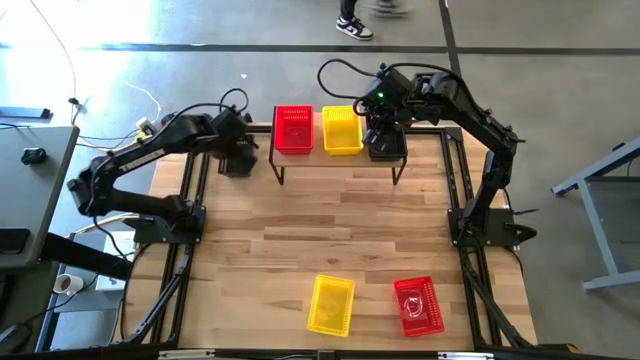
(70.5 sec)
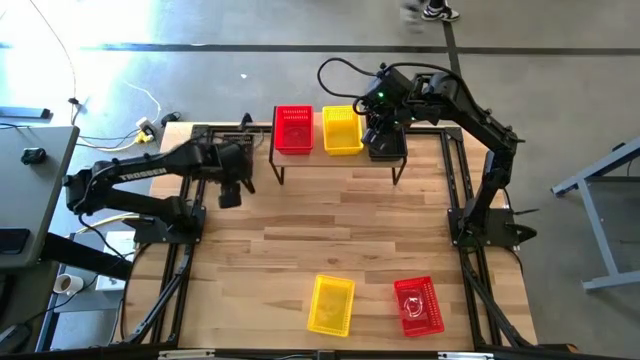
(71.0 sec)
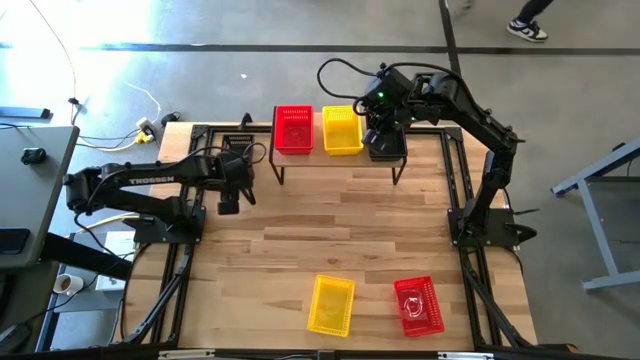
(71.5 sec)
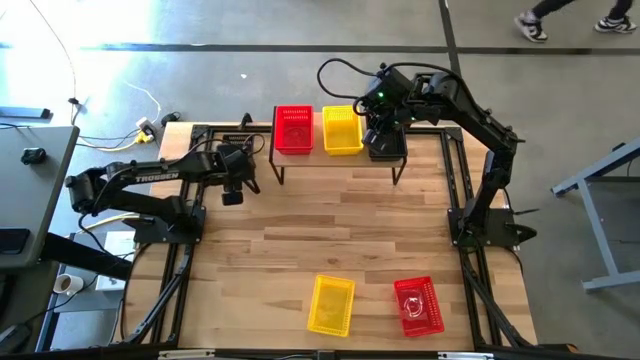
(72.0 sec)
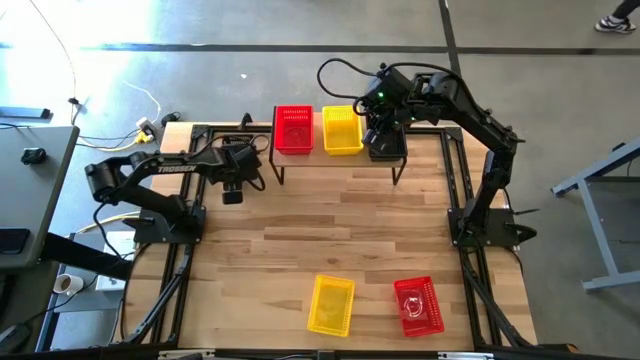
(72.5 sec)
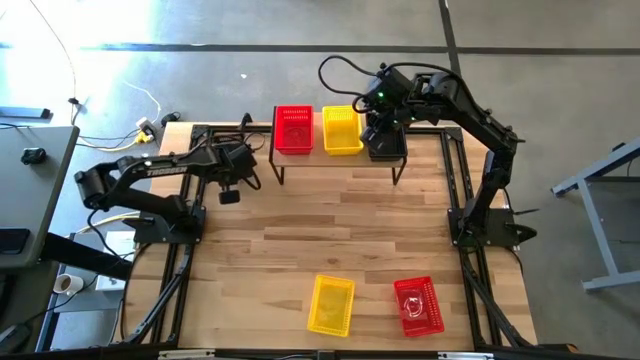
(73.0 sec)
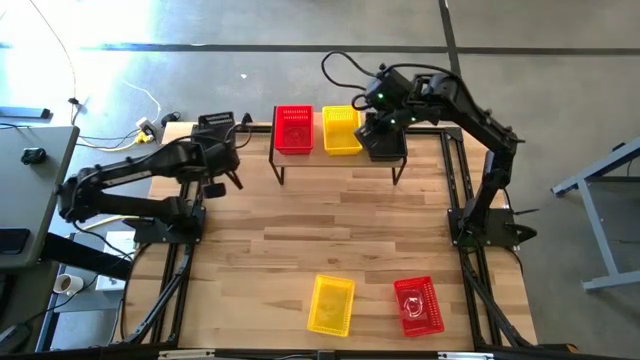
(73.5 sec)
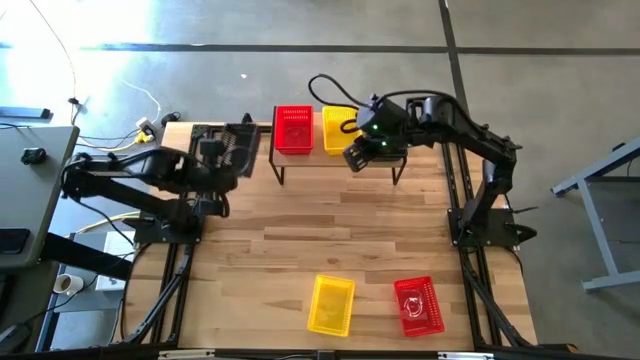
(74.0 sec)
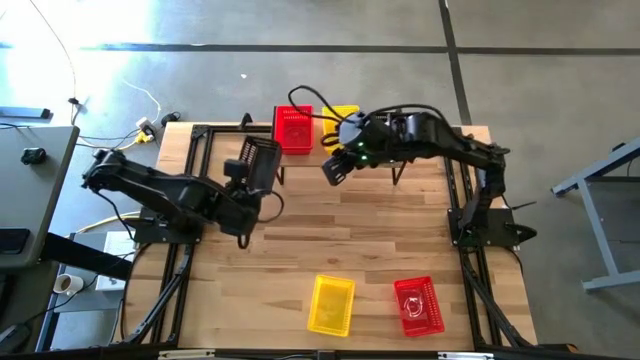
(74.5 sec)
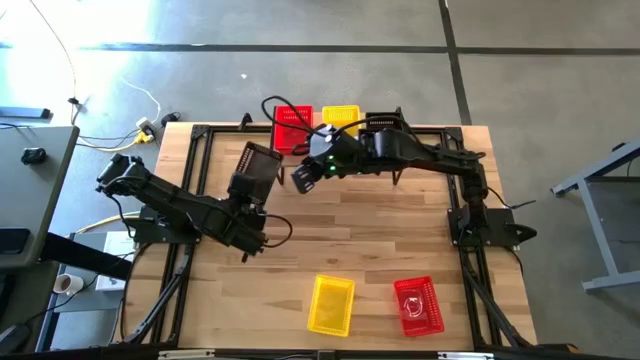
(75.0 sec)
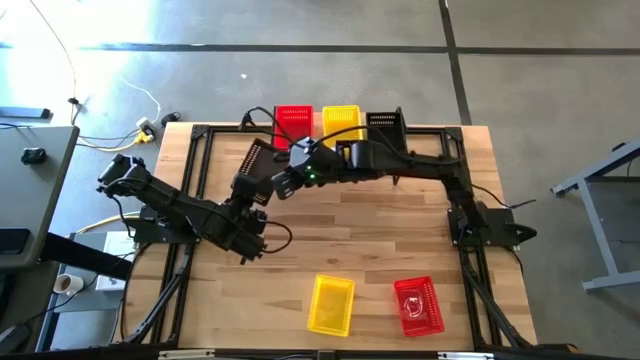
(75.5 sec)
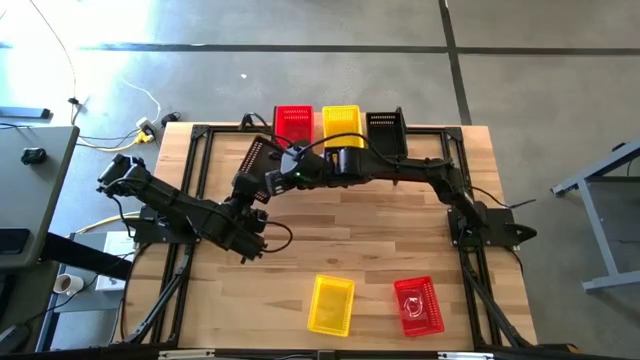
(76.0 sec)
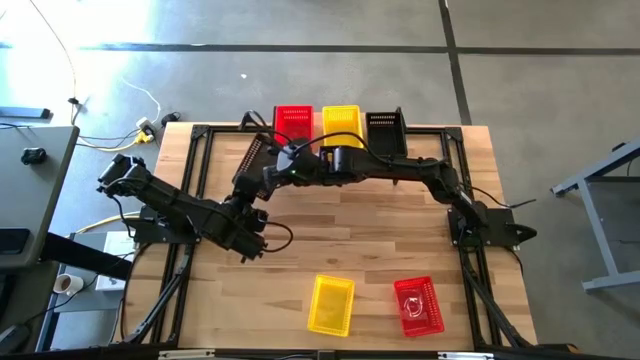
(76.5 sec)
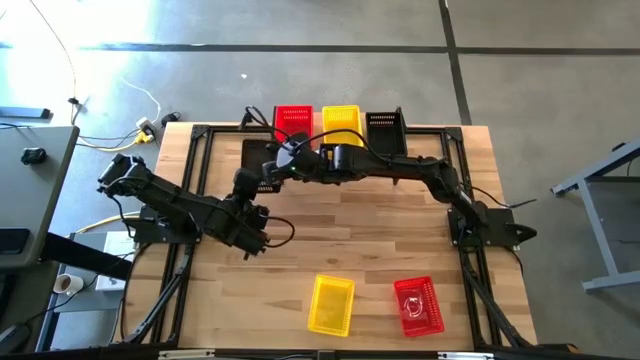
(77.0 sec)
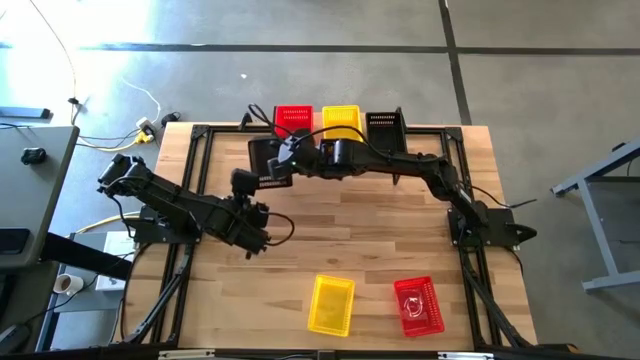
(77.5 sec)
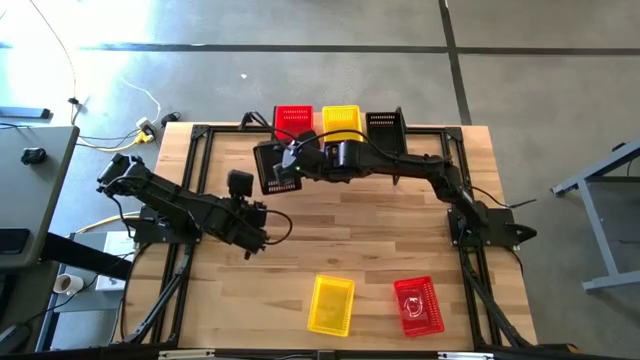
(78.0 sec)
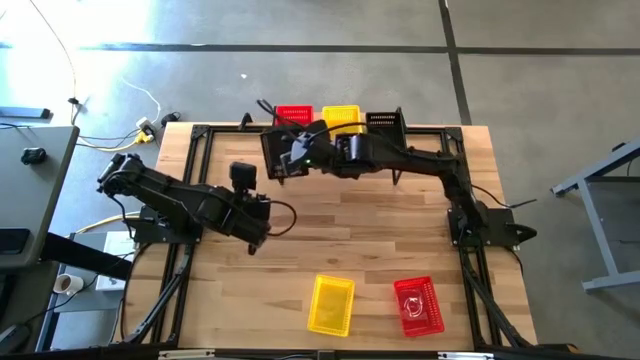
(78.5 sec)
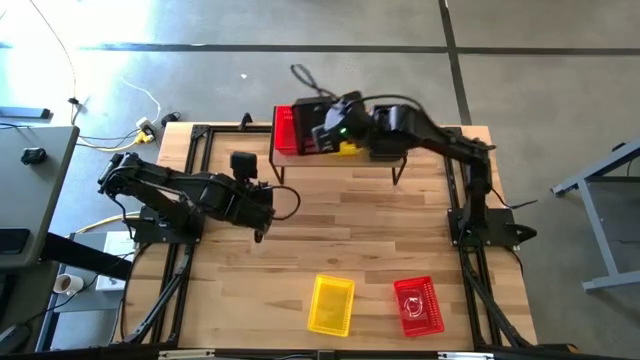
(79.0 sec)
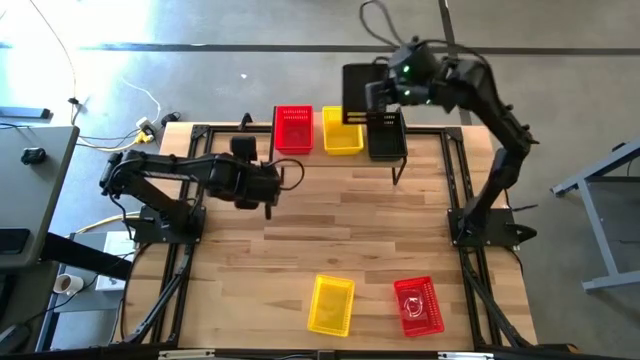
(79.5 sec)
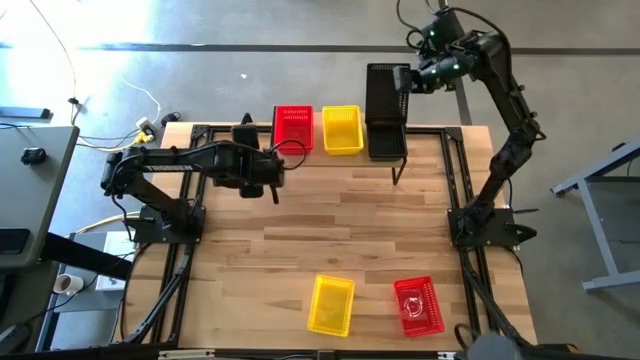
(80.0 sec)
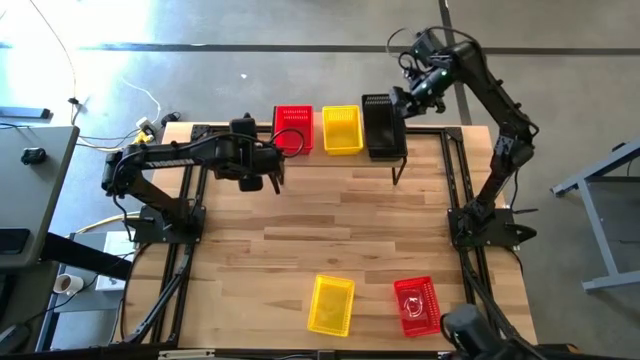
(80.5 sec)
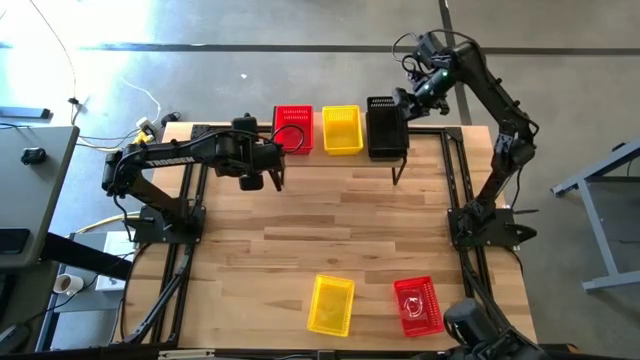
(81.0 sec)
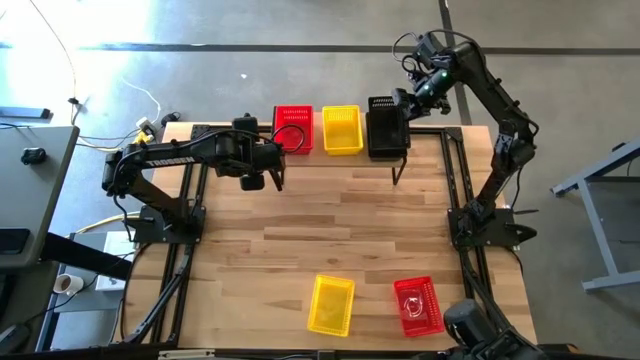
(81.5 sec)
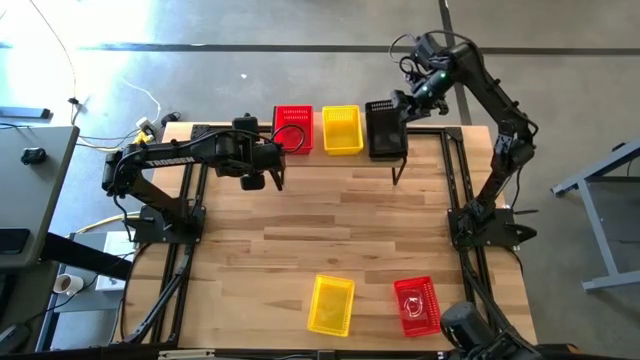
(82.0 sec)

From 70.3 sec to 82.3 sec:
Task: Stack baskets on shelf by color
Stack the black bin on top of the other black bins on the shelf

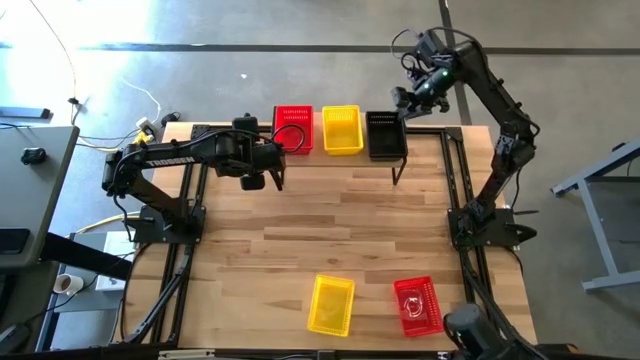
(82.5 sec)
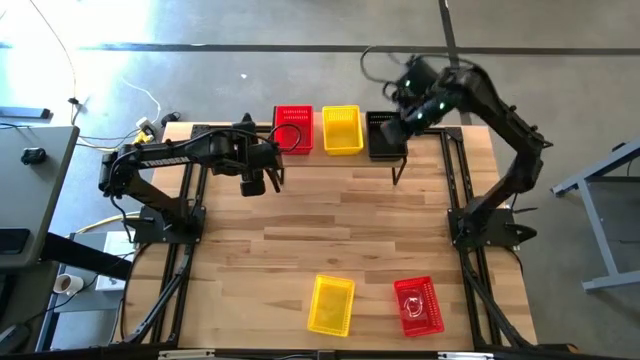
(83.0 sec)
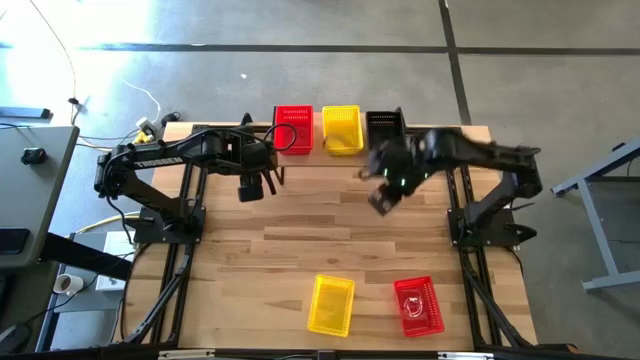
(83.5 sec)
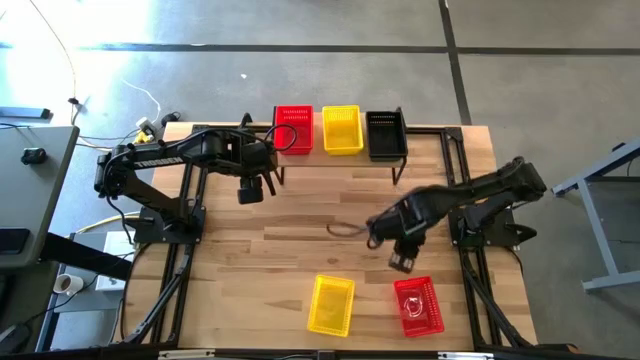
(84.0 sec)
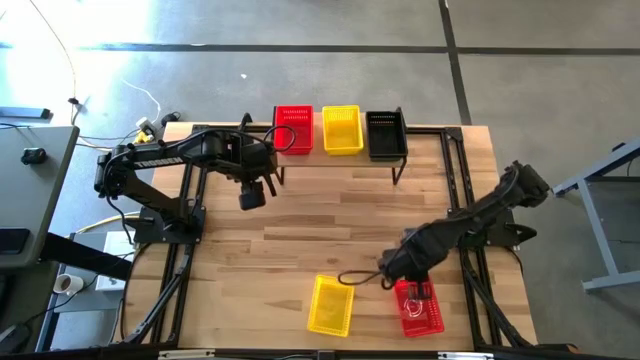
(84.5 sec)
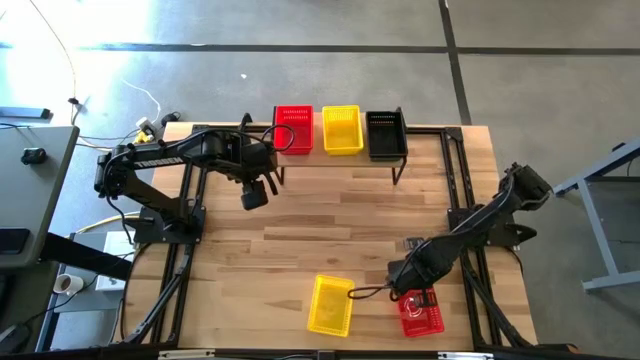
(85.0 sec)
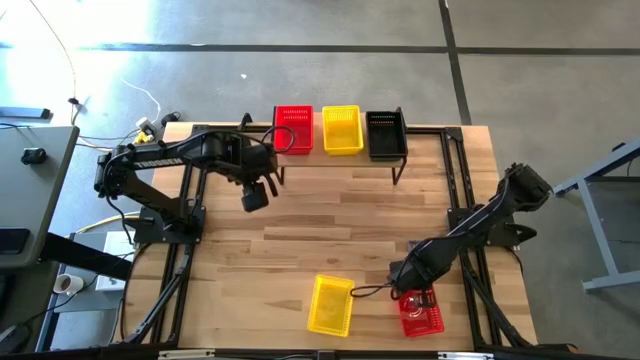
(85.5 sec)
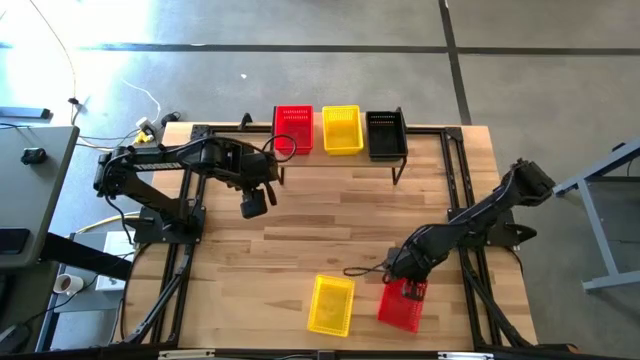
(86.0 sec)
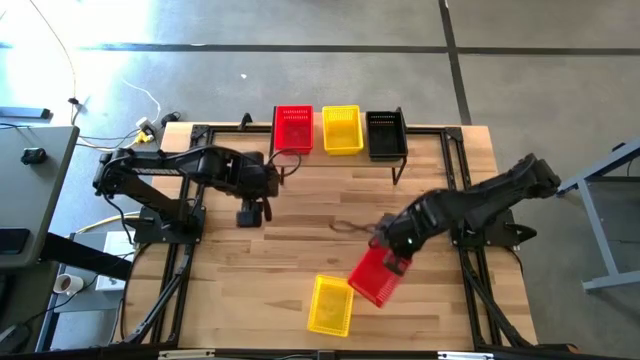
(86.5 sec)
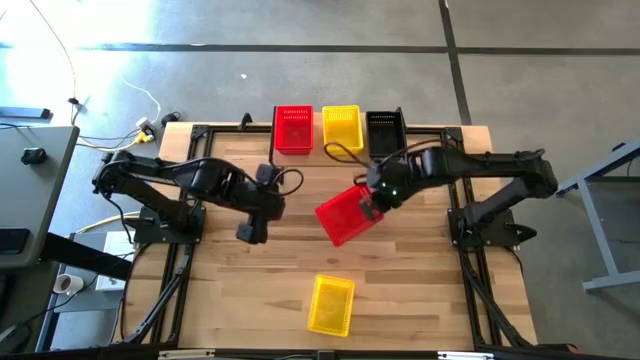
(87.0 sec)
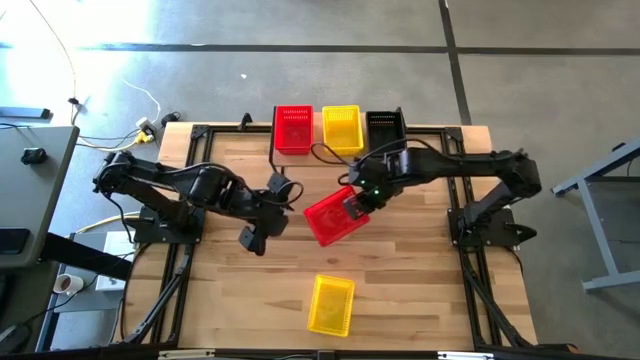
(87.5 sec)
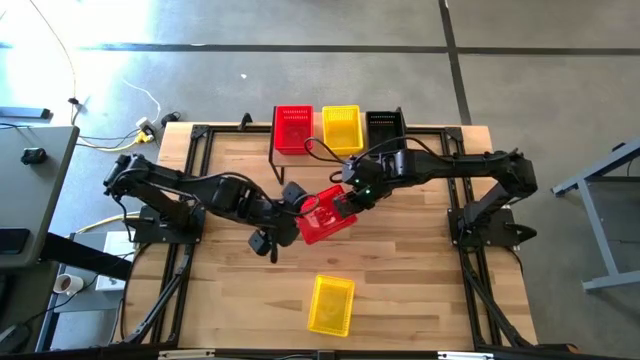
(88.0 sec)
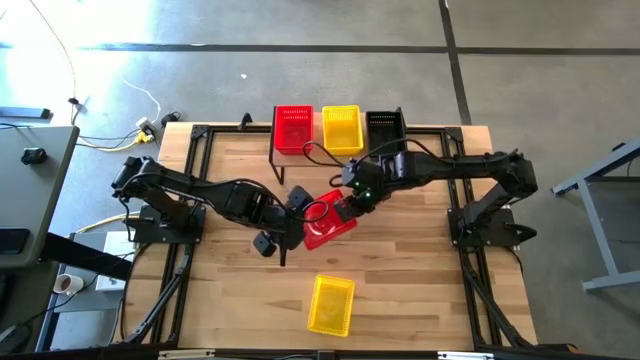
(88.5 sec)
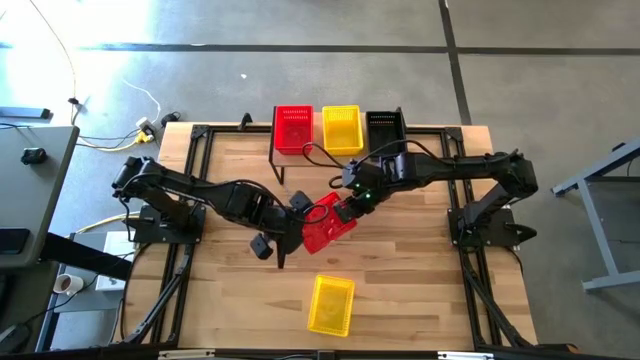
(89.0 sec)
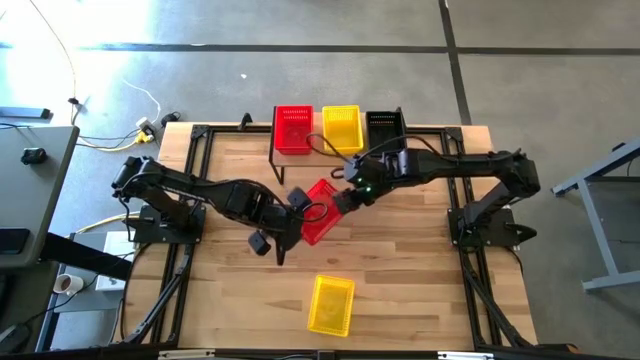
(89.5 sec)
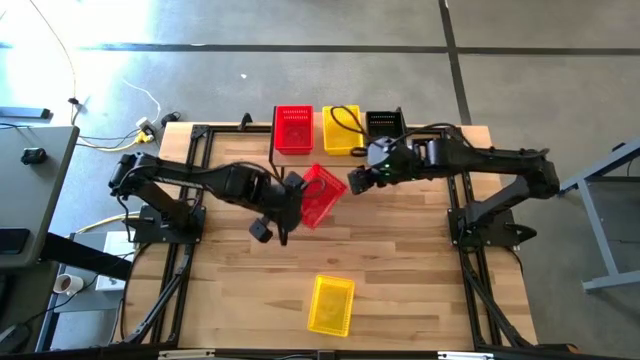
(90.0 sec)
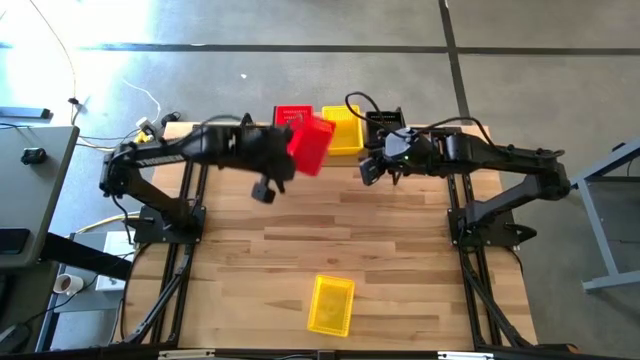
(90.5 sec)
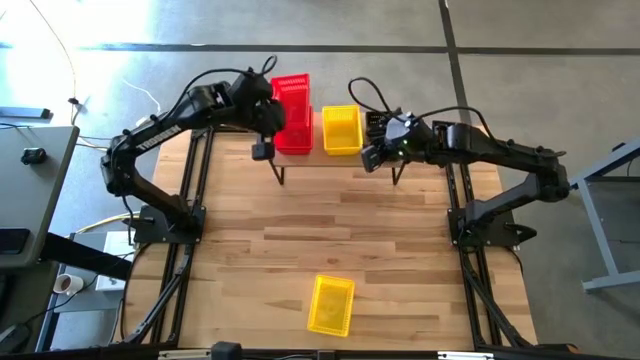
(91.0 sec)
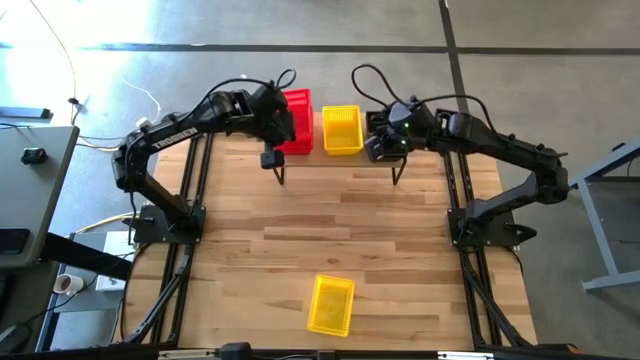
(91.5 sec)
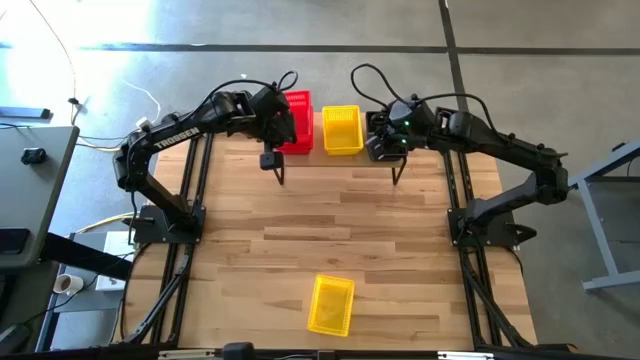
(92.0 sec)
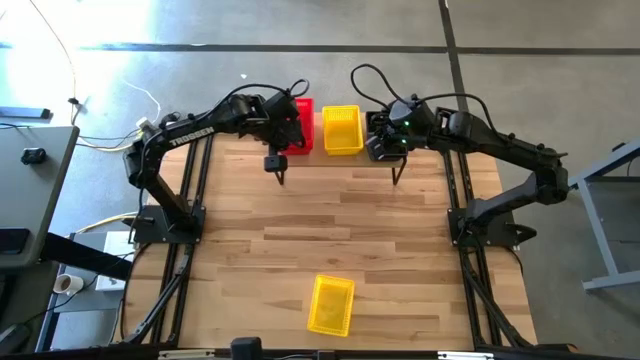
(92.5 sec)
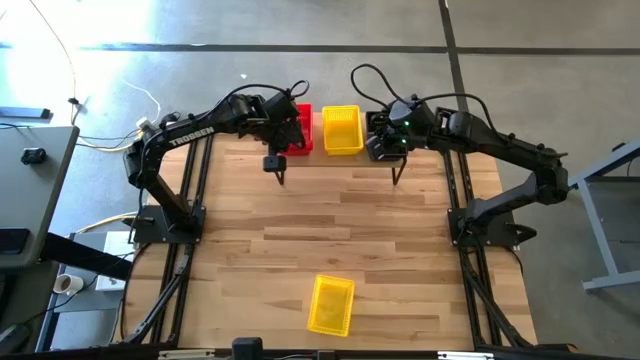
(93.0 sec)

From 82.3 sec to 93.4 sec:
Stack the red bin on top of the other red bins on the shelf
